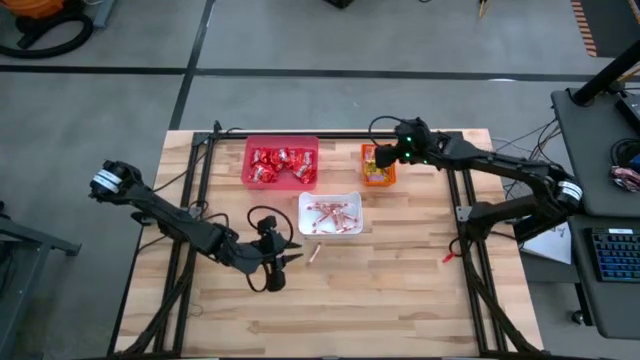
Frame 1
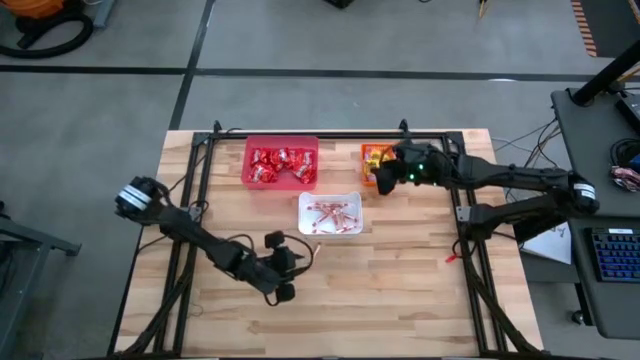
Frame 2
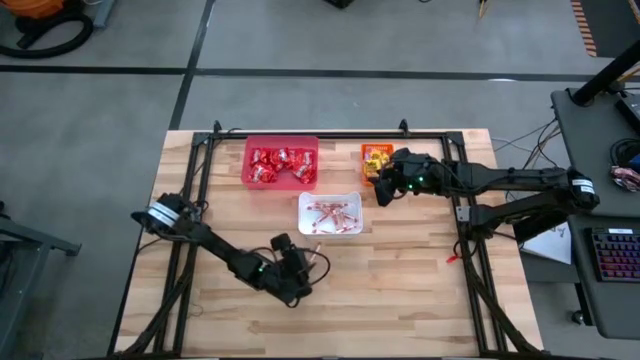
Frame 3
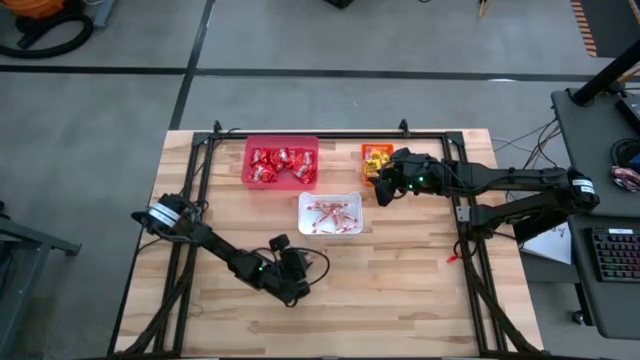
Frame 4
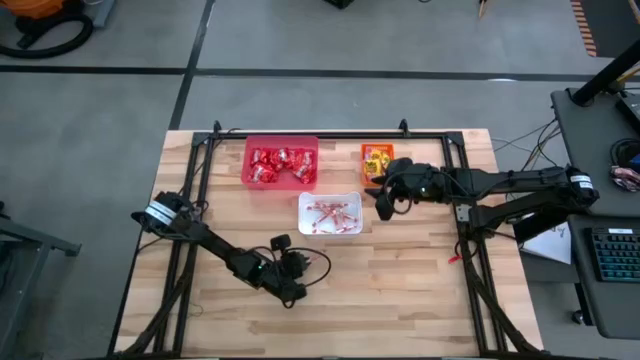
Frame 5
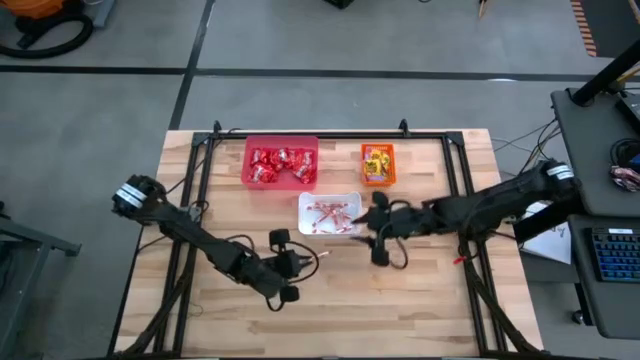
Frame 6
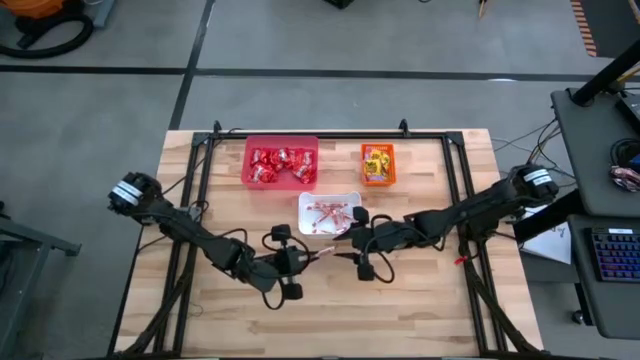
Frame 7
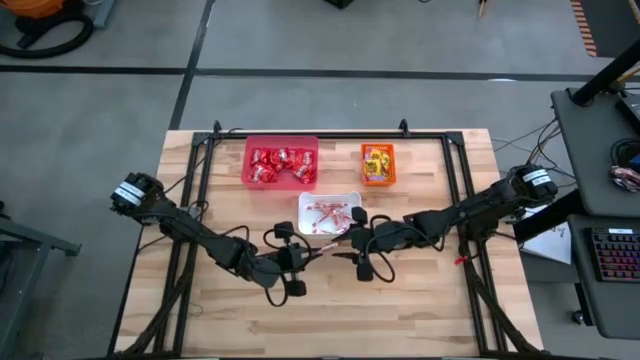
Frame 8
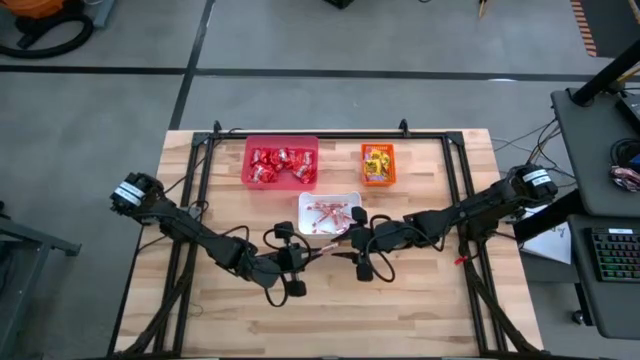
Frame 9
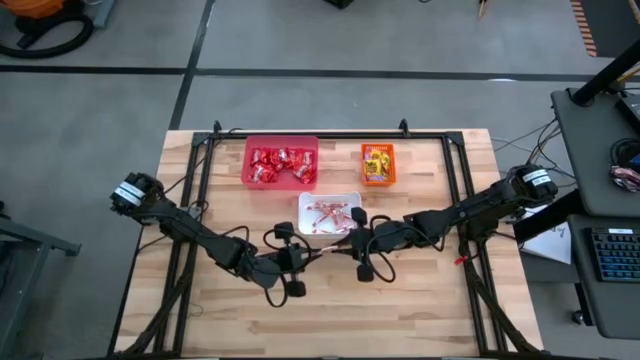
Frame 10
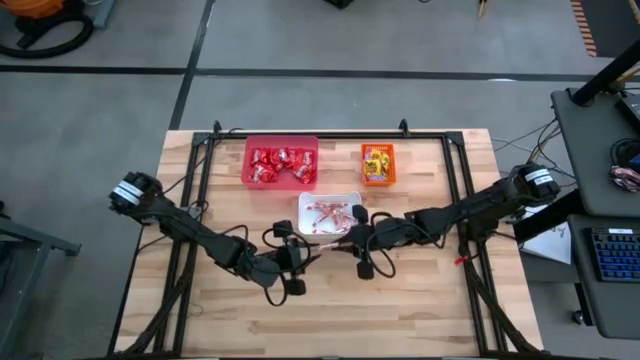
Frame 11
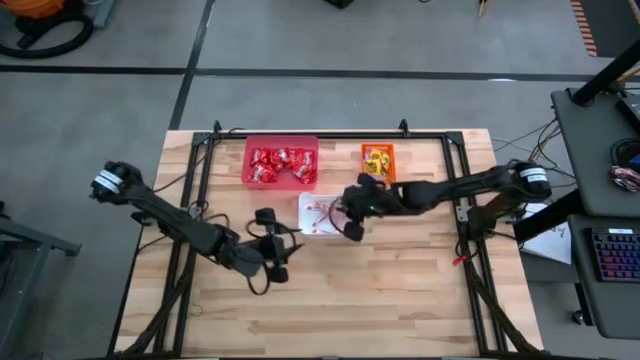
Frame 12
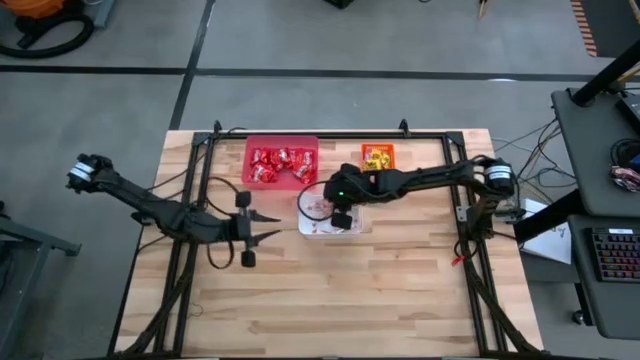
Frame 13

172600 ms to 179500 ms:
Task: Sort candy
Put the white candy into the white bin

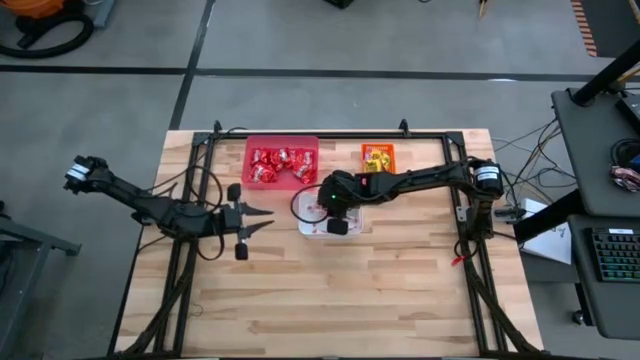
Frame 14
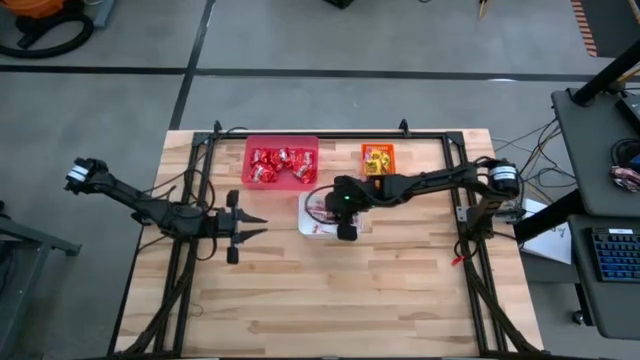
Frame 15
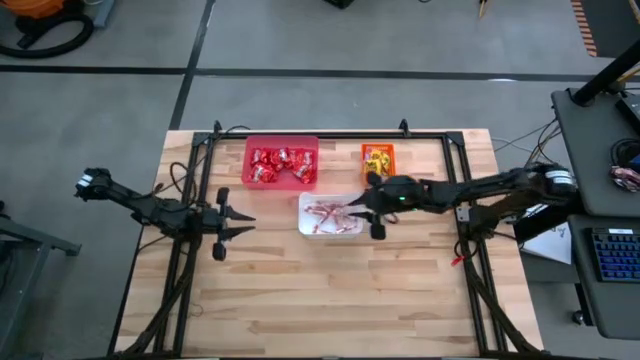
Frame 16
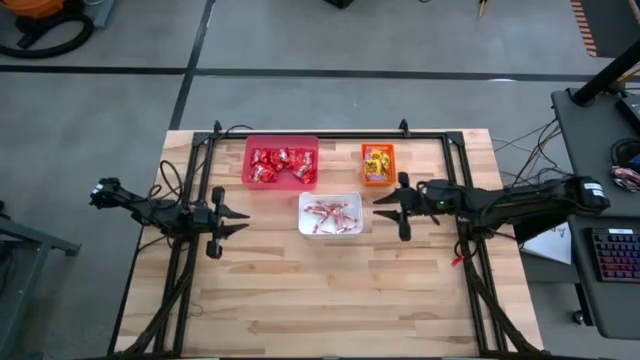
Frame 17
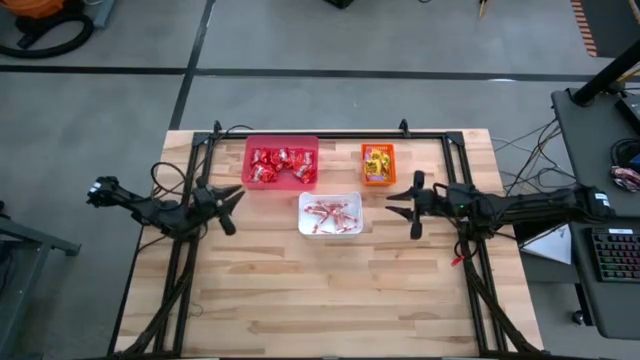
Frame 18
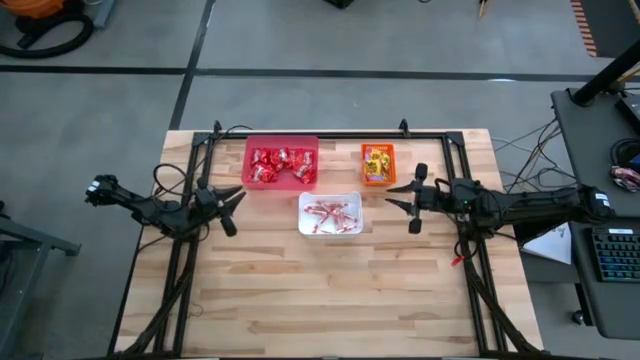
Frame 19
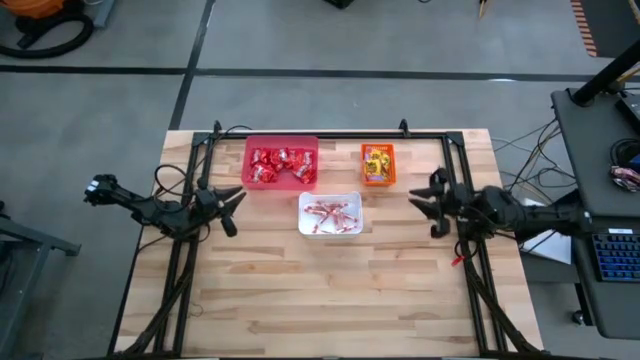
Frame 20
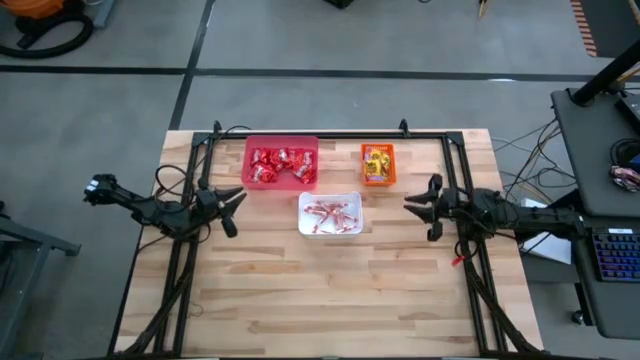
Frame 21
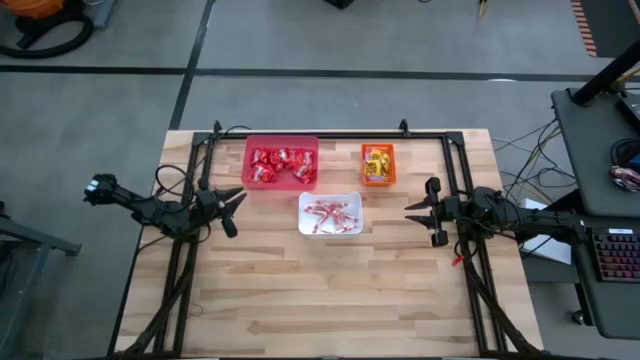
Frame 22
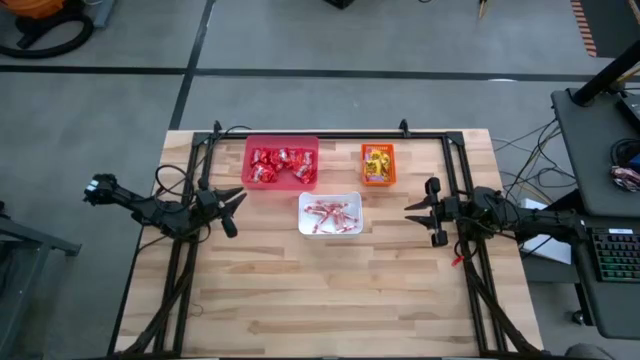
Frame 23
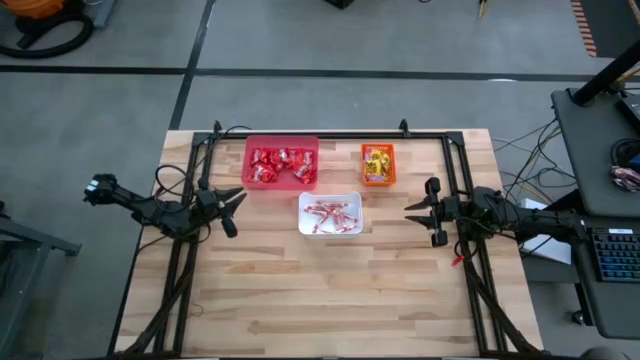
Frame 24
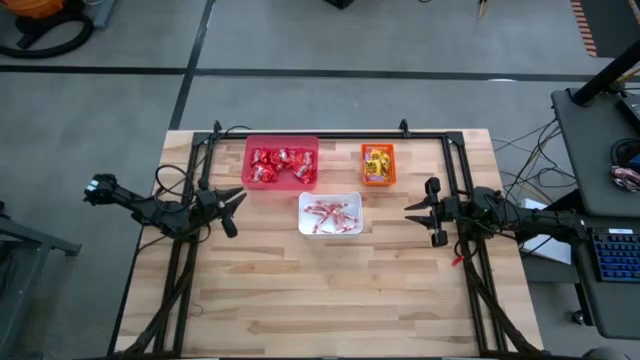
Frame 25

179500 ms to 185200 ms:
Return to Home Position

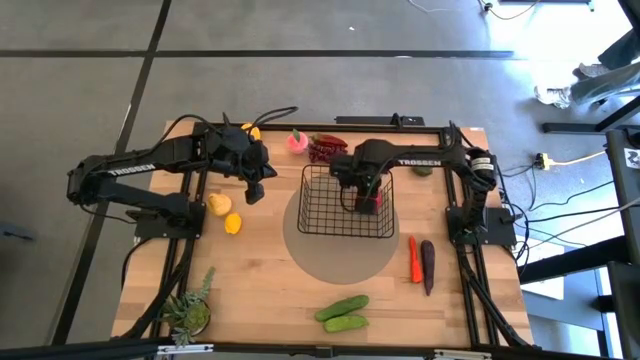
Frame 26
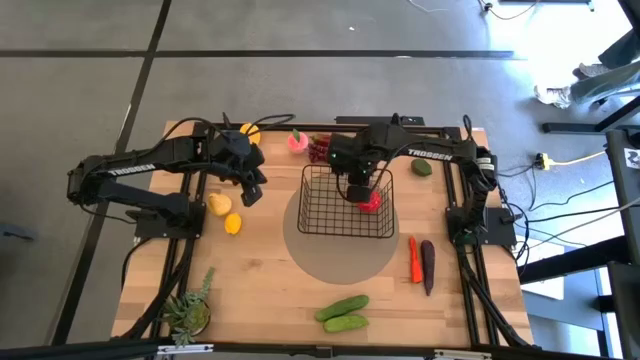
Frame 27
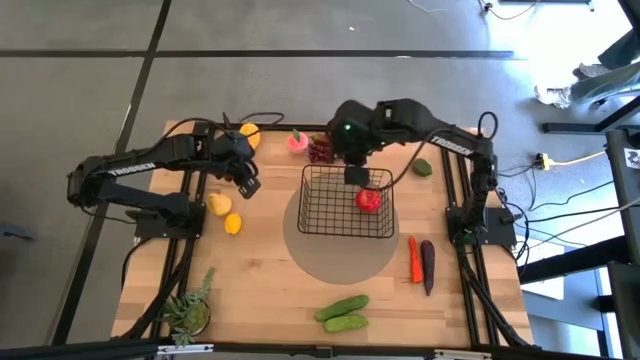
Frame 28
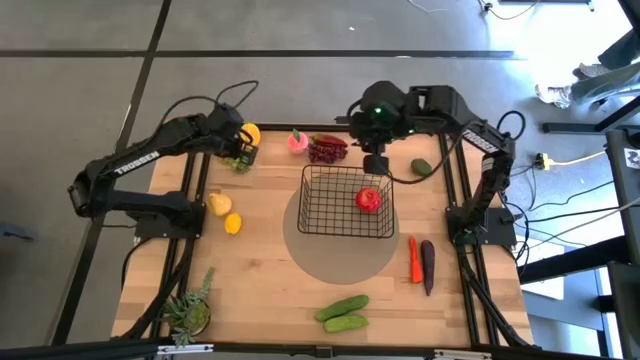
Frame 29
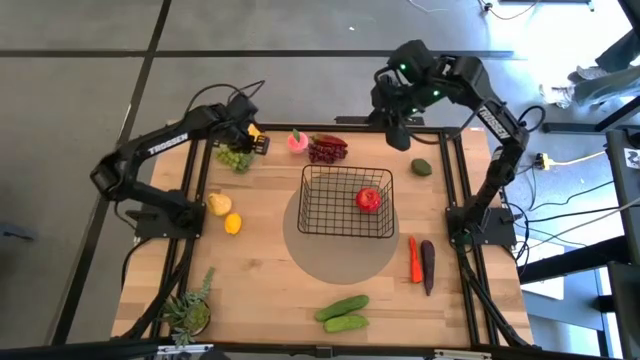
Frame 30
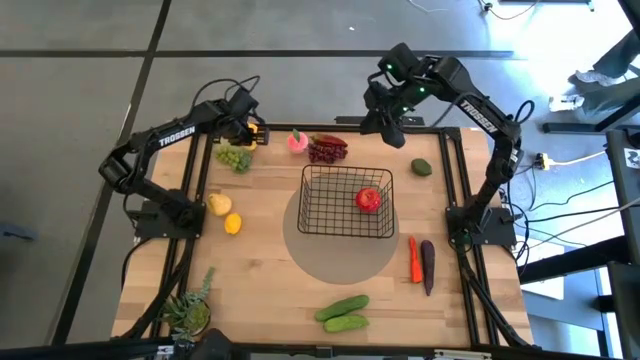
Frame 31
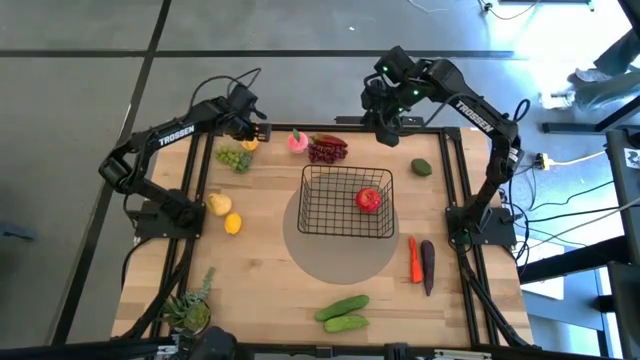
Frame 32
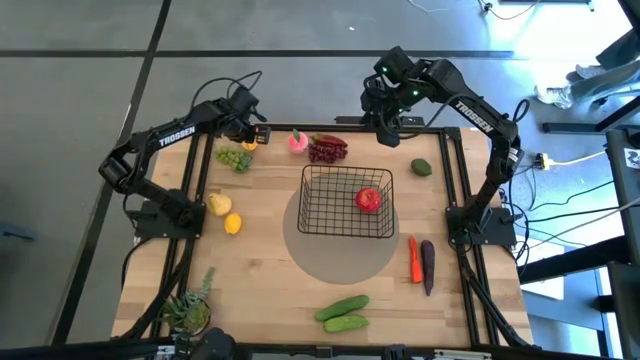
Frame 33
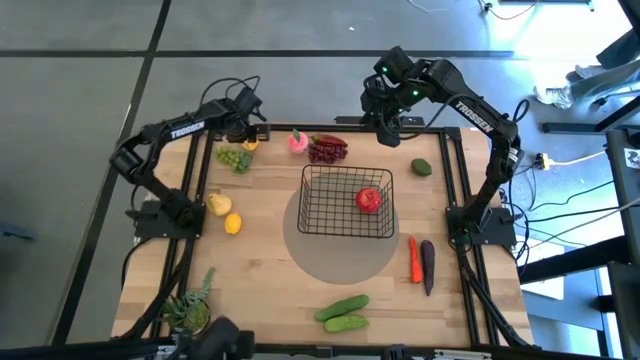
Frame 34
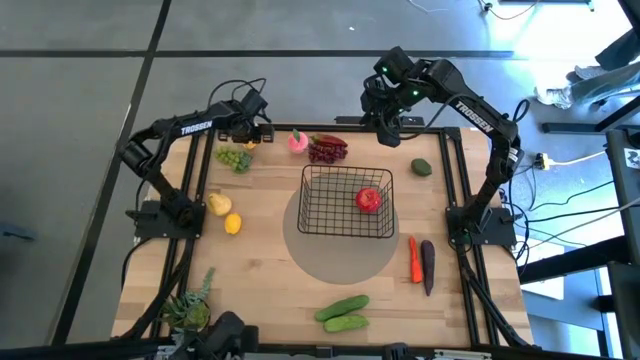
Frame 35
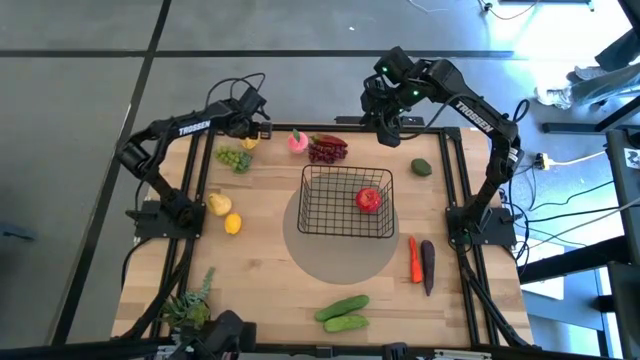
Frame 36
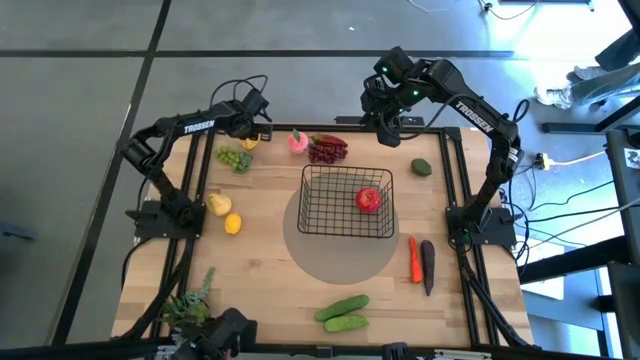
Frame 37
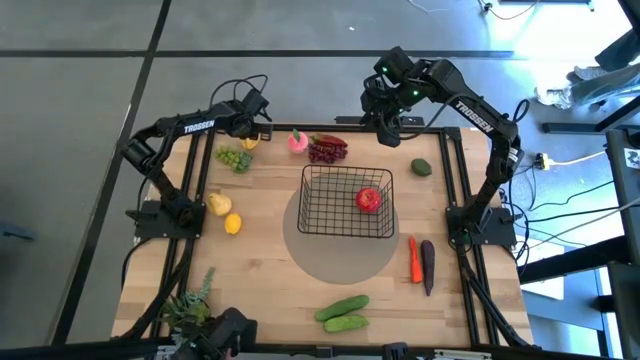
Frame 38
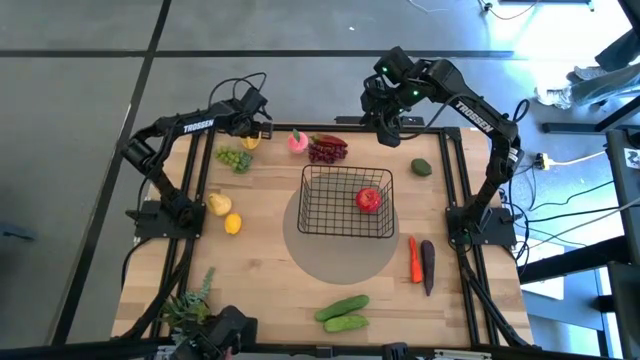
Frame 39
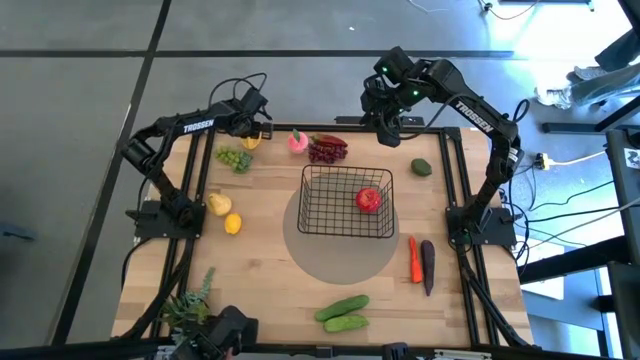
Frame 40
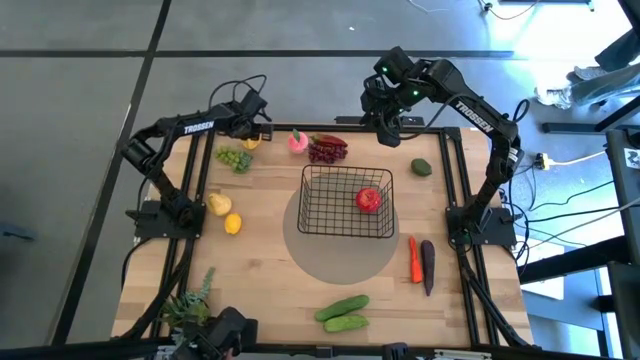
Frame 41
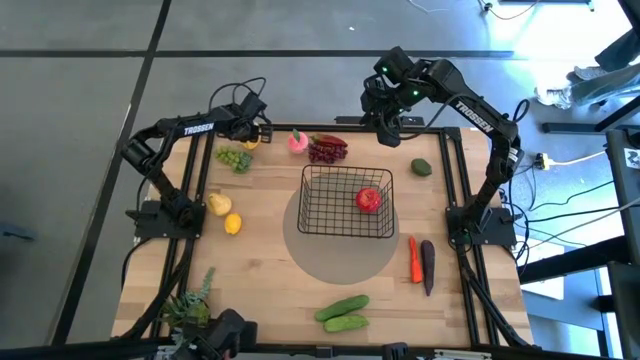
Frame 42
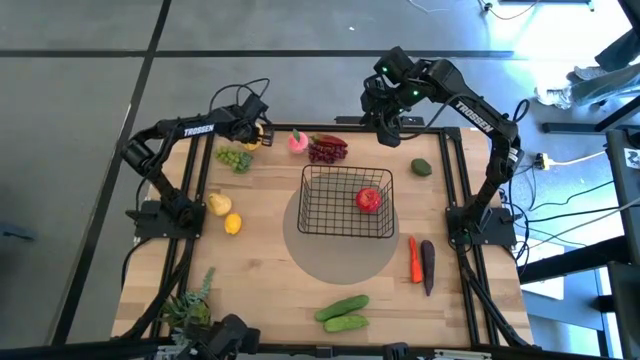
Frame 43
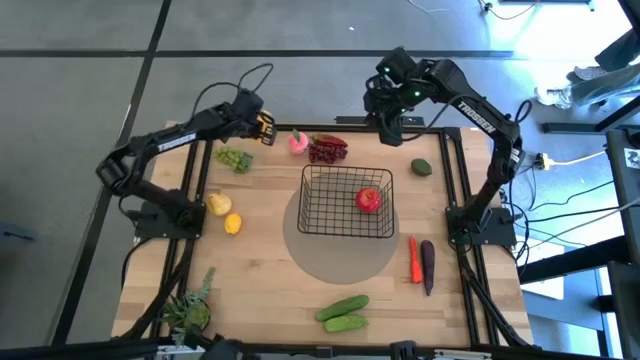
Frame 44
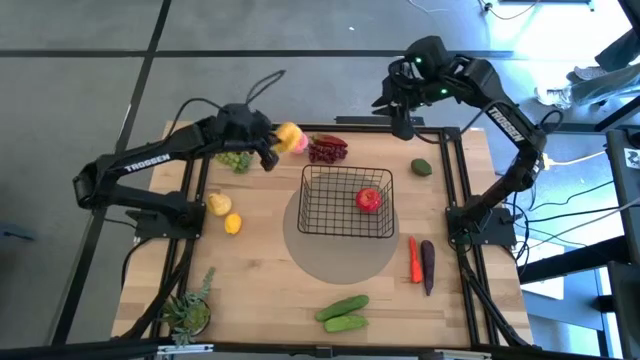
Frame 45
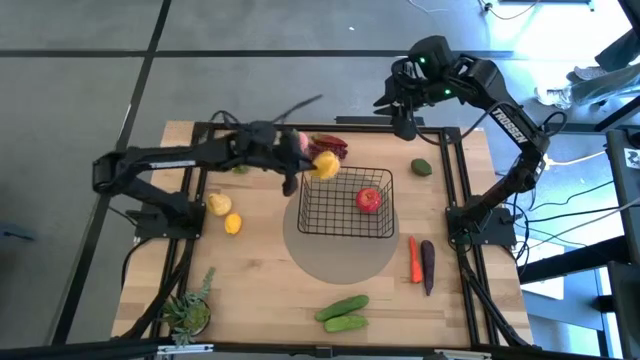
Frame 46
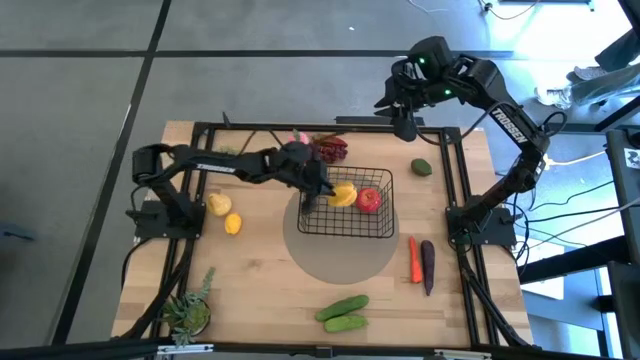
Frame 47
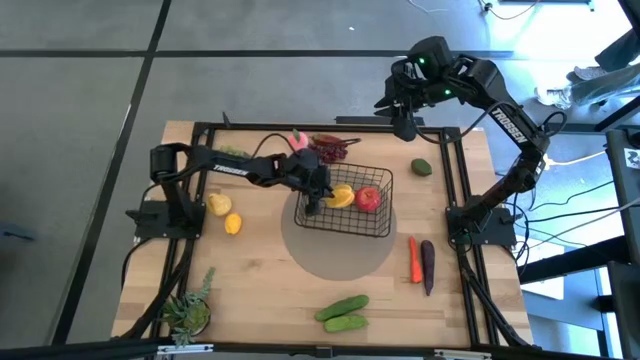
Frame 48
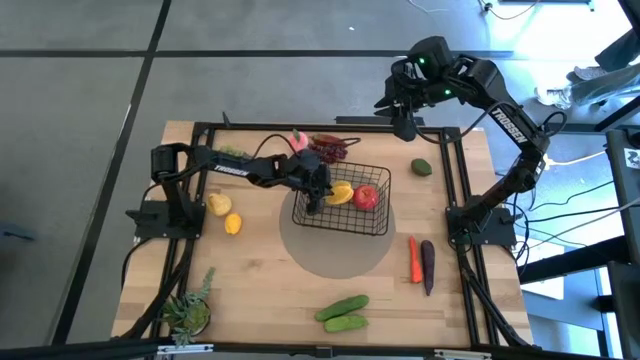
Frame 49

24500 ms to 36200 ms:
Task: Build produce basket
Put the yellow star fruit into the black wire basket
